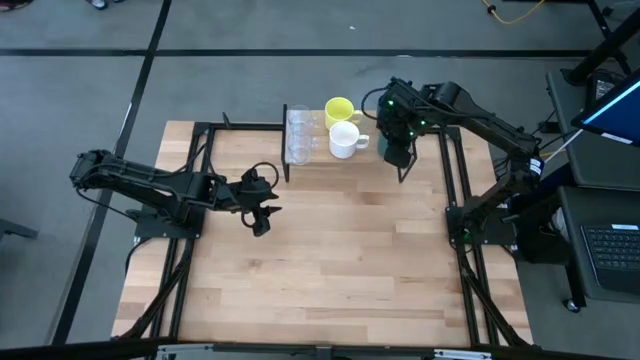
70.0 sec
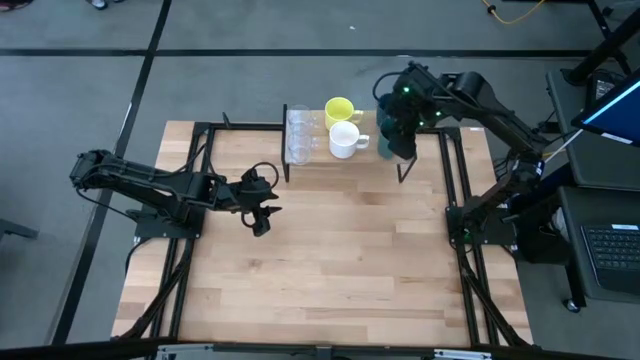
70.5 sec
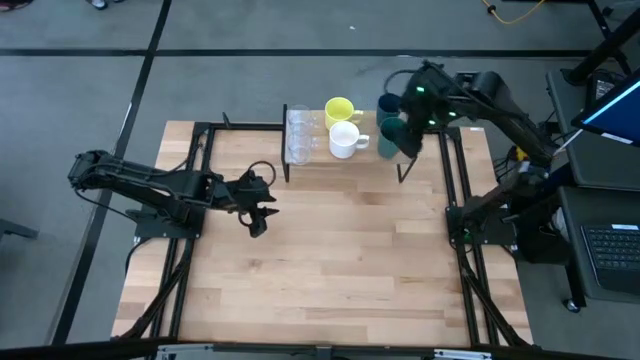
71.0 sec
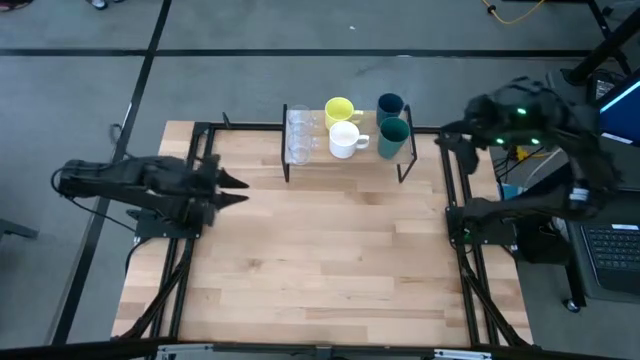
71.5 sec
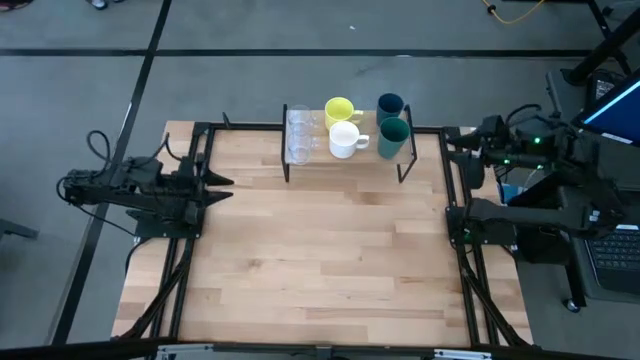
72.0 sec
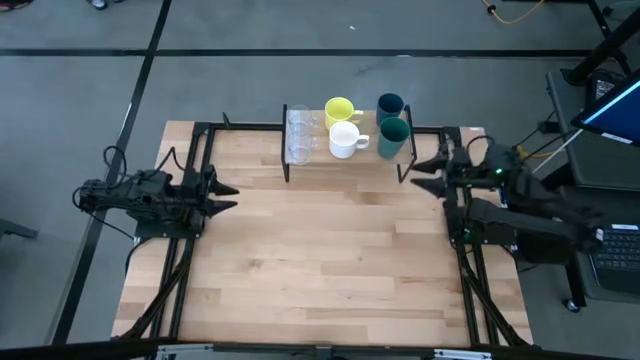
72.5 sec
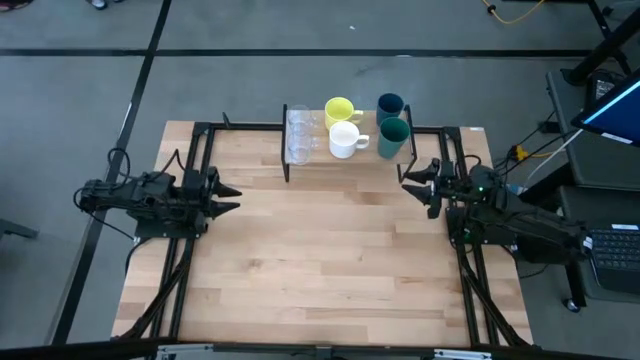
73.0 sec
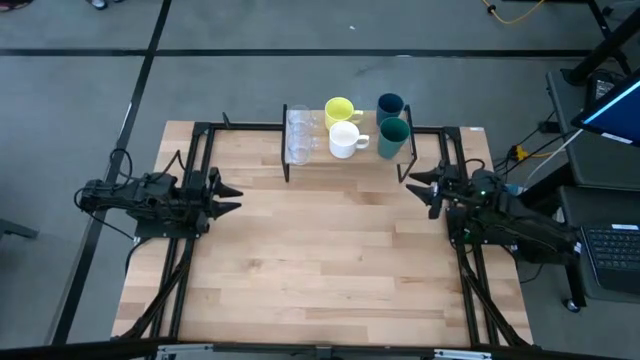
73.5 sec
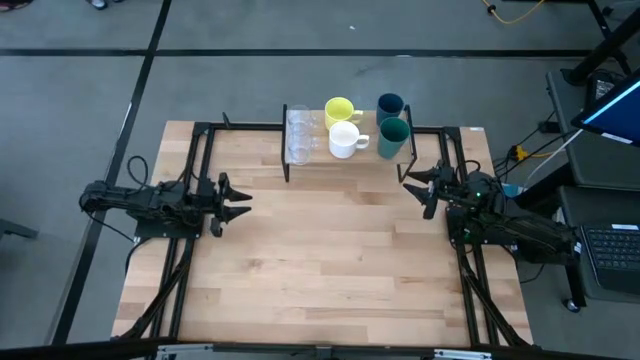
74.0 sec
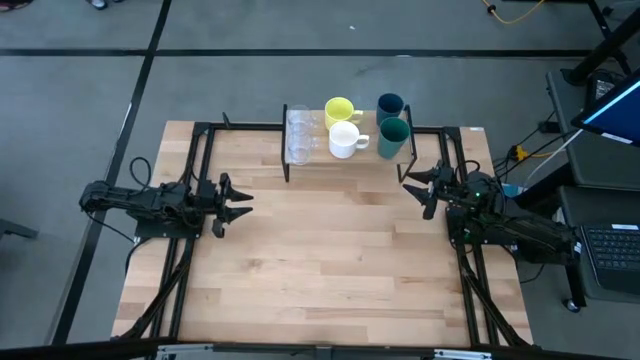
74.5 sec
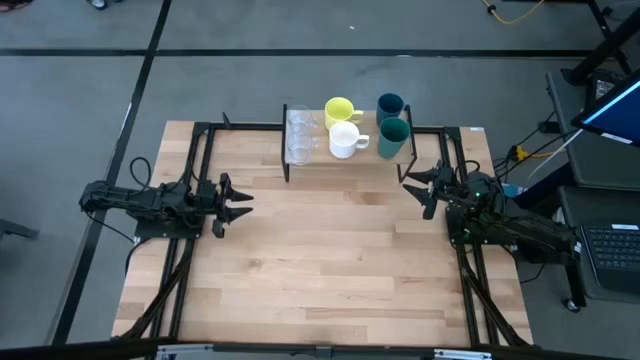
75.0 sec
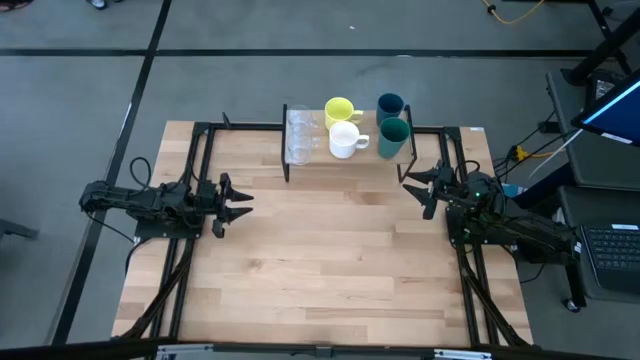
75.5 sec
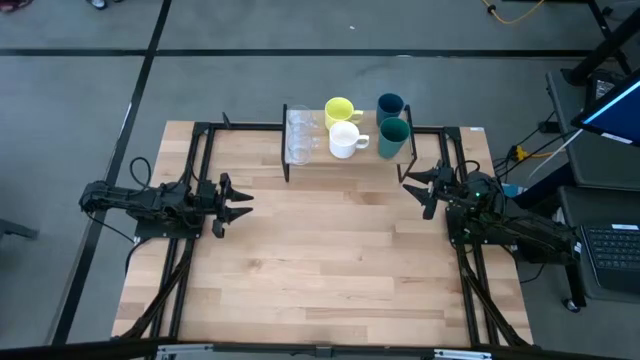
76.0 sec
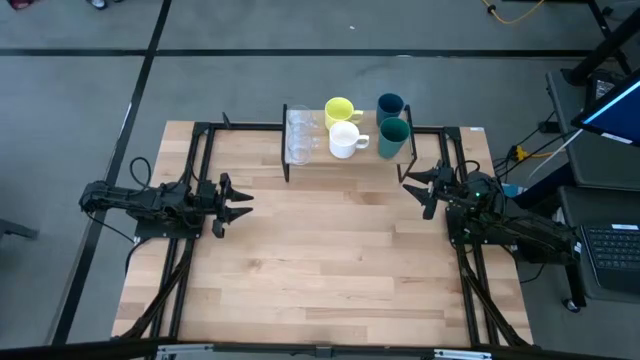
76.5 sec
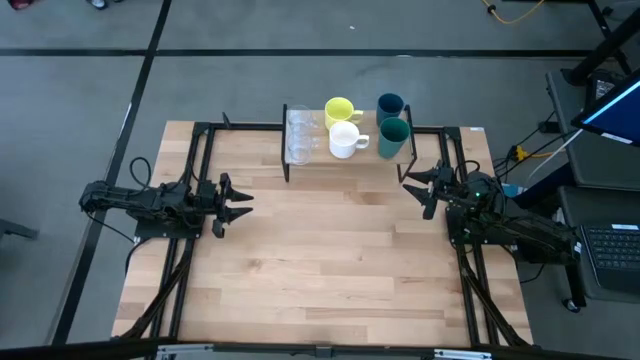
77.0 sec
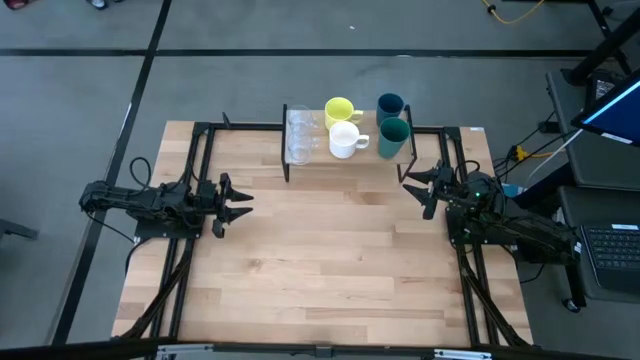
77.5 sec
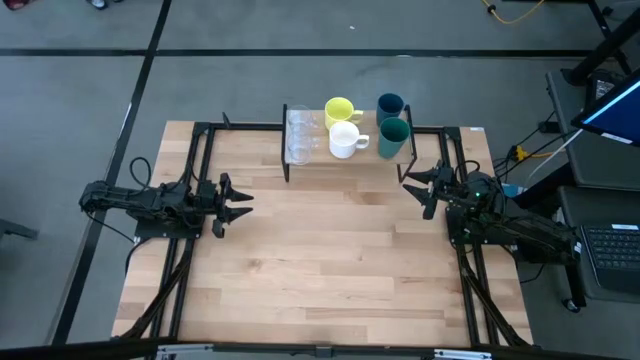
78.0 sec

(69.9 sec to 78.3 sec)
Task: Stack small to large cups/mugs on shelf
Return to Home Position

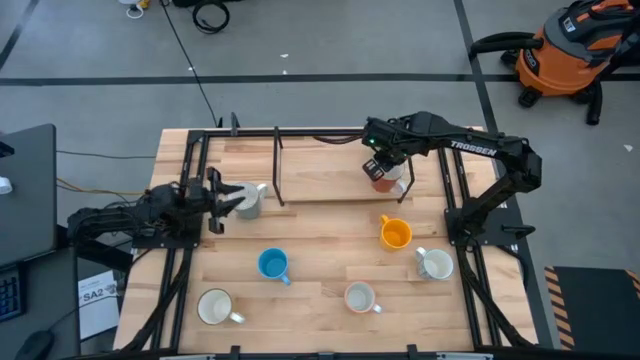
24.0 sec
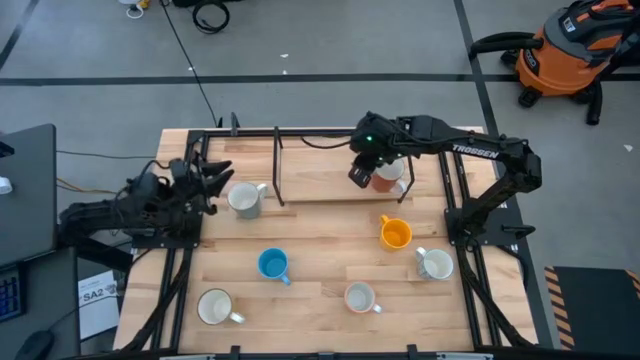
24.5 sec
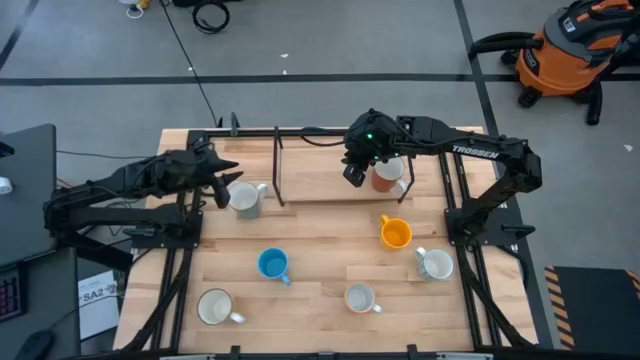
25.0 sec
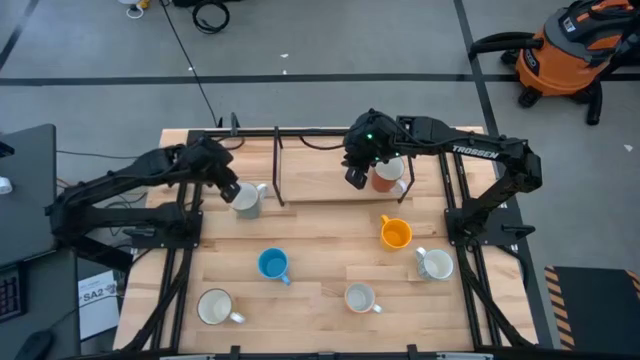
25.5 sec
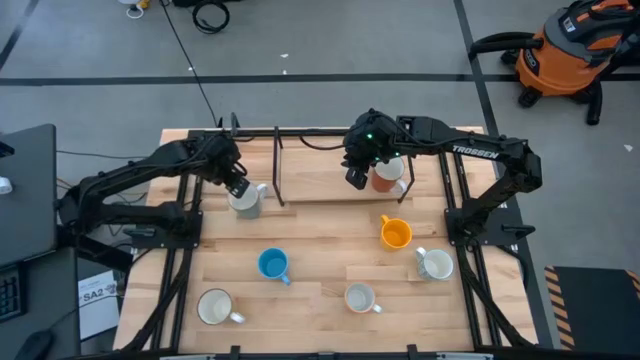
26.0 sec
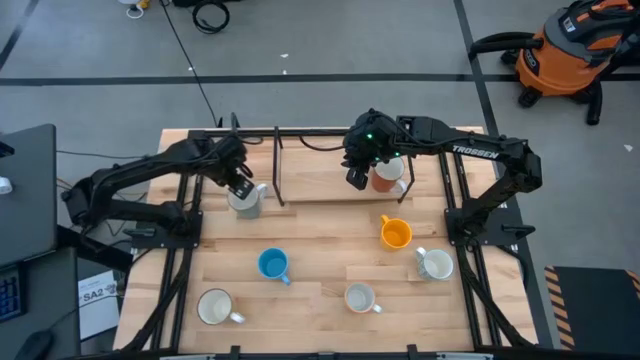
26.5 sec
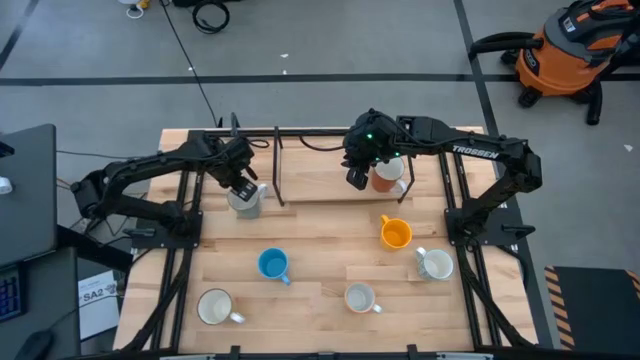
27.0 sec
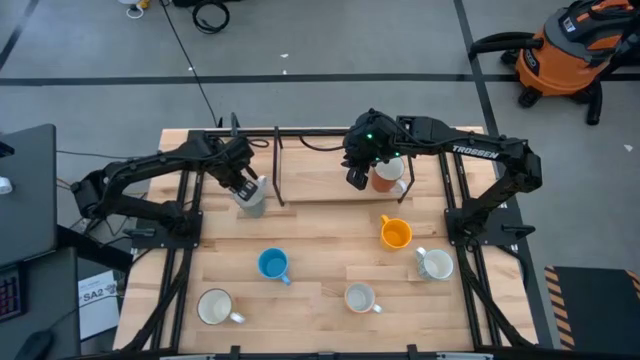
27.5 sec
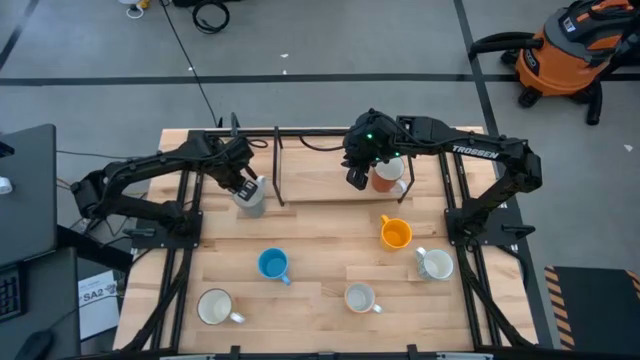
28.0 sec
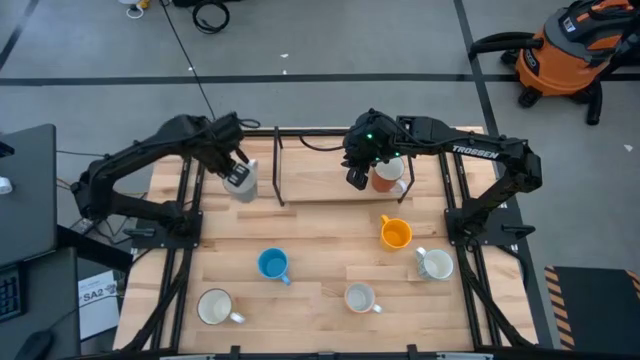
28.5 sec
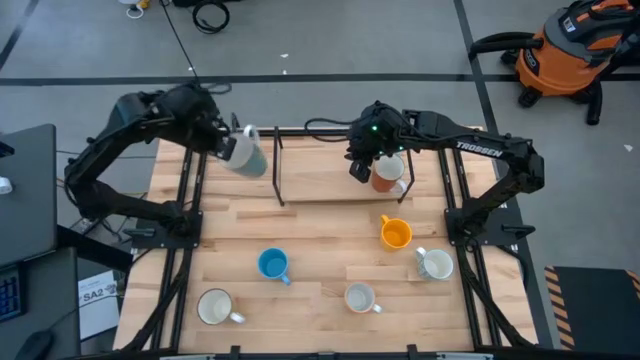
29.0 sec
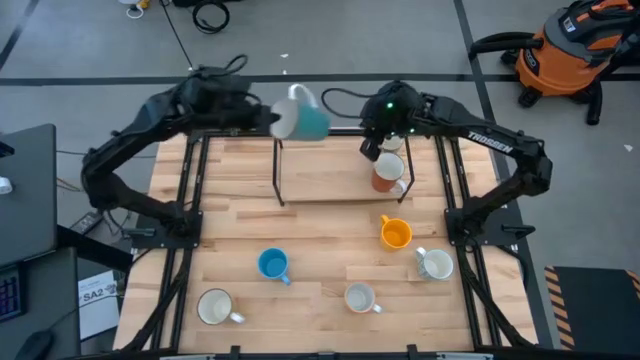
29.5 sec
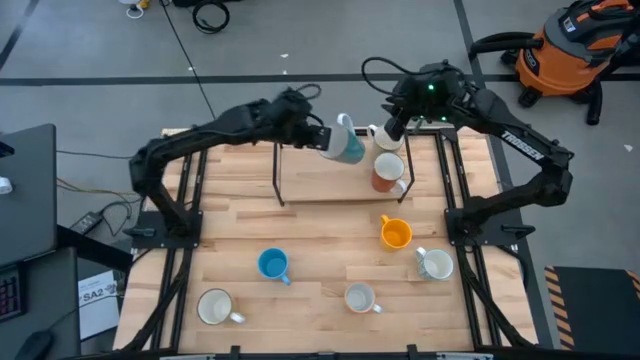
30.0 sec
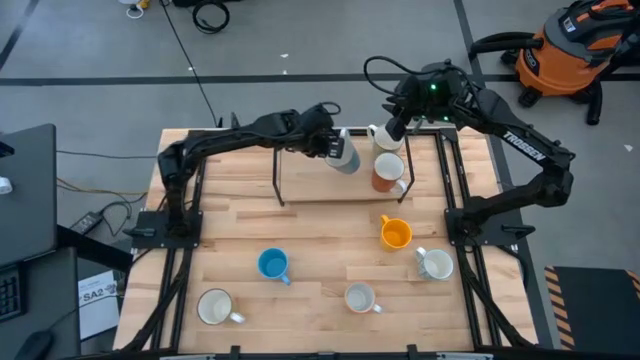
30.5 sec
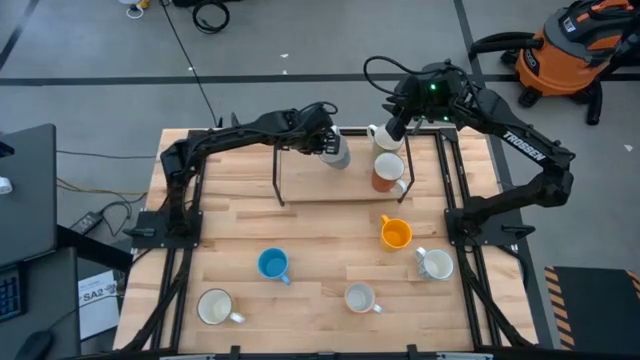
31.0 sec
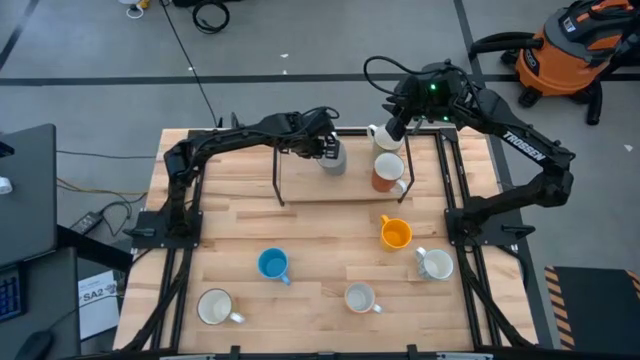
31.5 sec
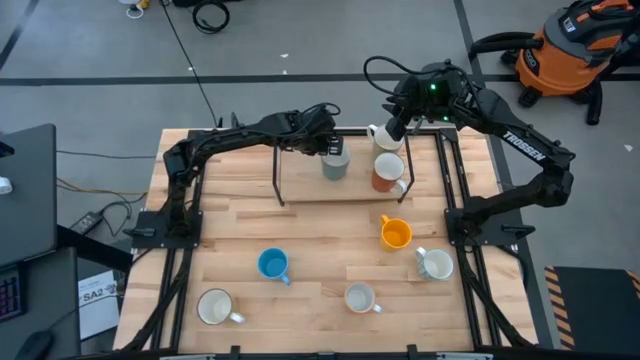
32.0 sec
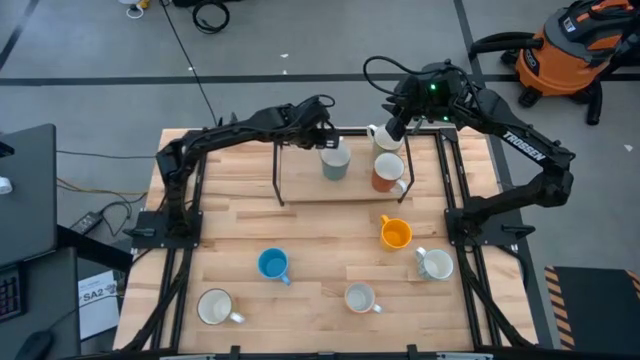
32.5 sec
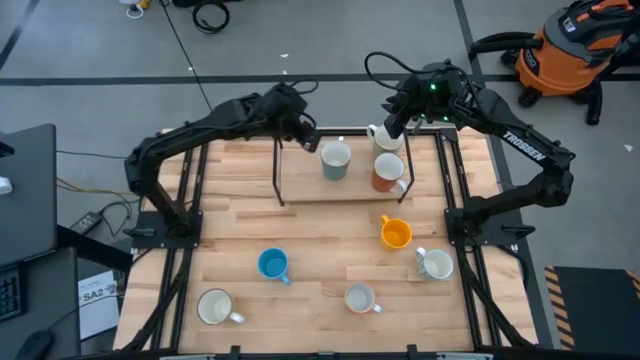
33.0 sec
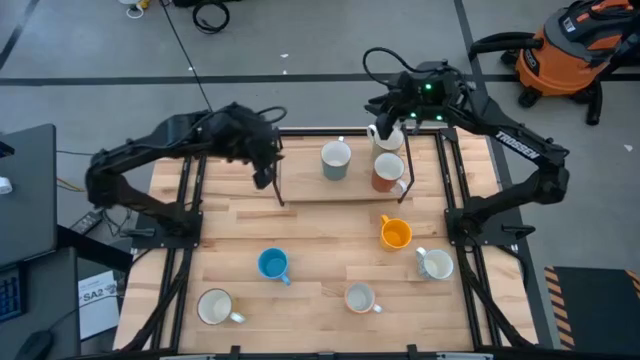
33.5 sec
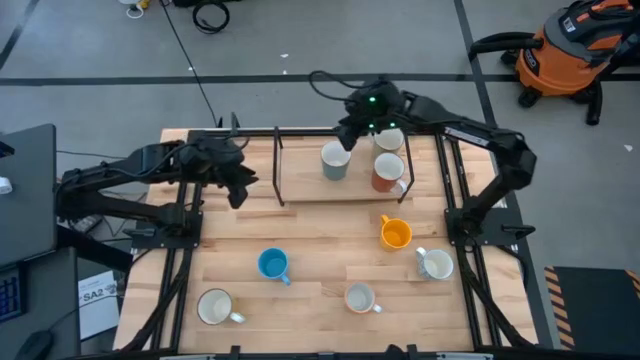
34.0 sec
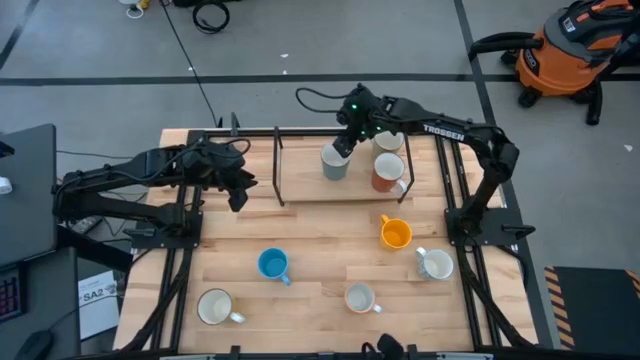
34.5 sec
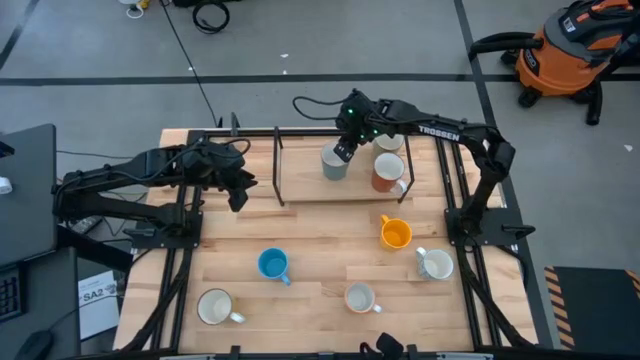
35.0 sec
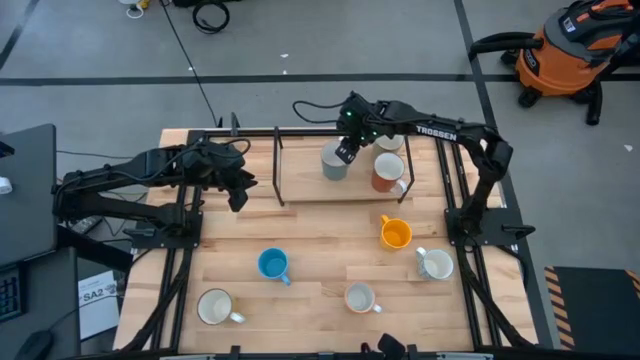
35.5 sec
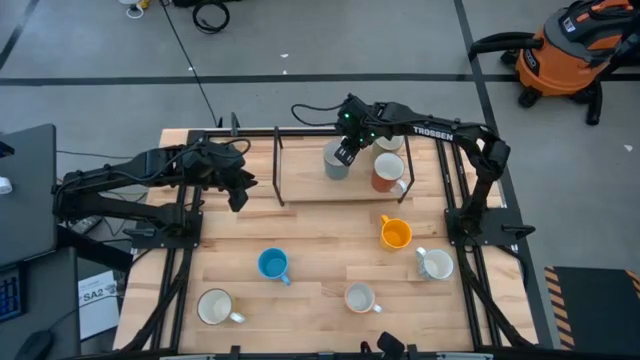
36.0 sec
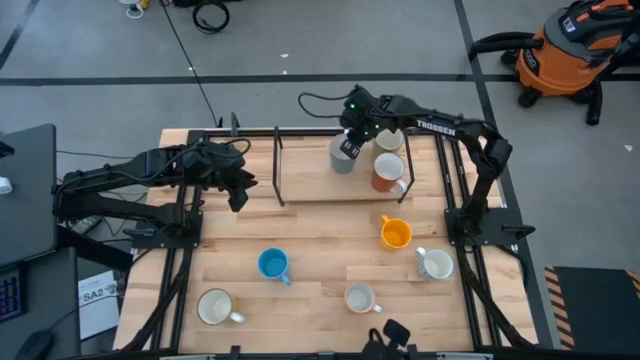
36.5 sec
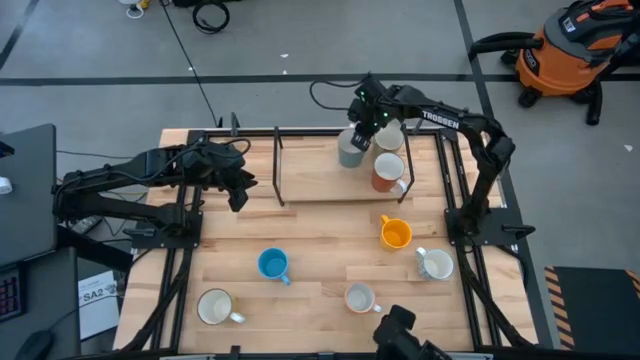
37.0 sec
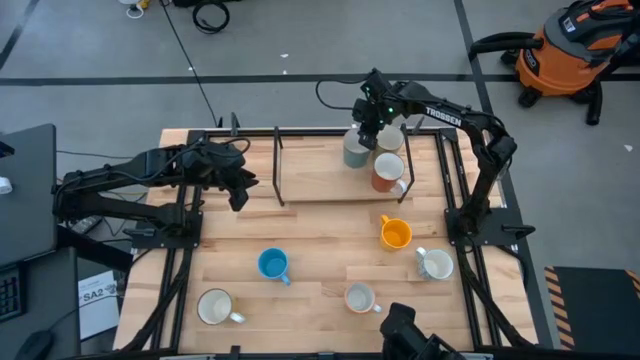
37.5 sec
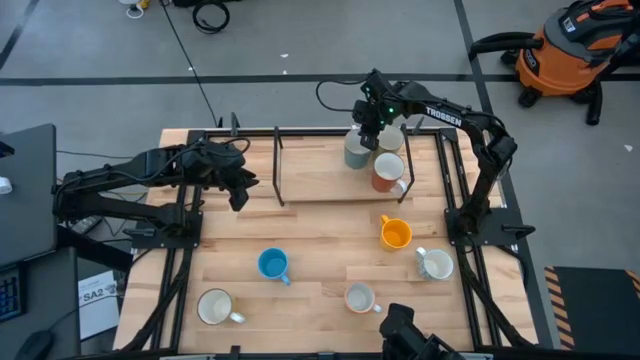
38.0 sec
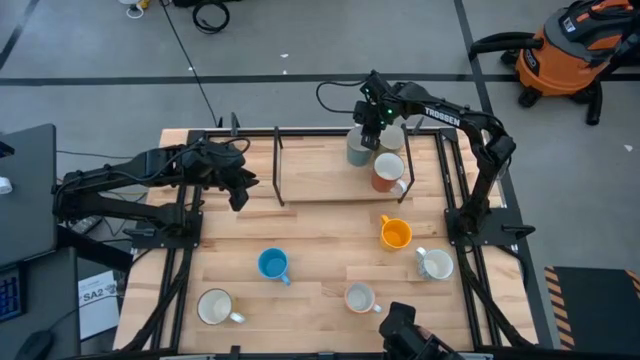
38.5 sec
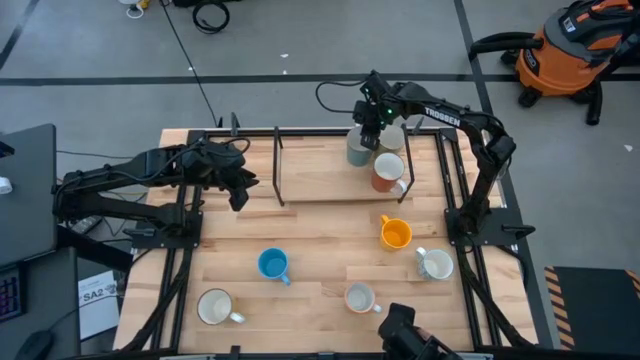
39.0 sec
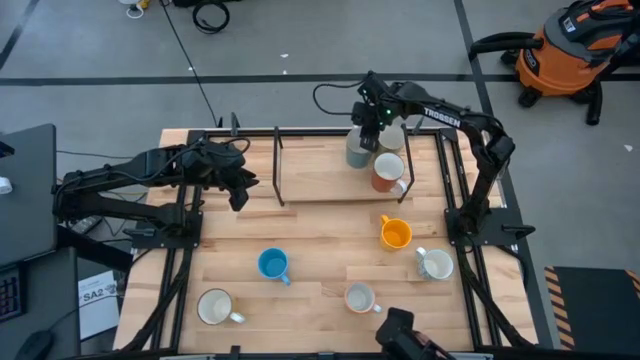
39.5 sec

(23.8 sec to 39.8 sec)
Task: Place coffee mugs
Put the light blue cup on the shelf
